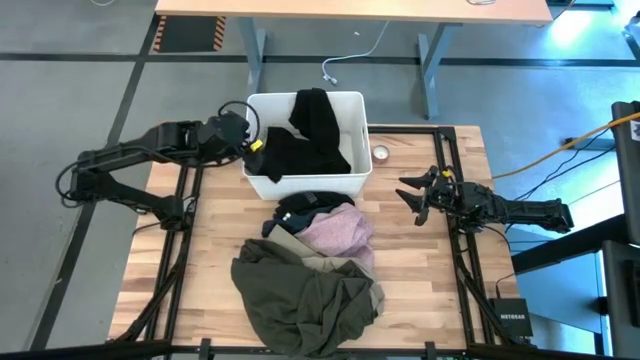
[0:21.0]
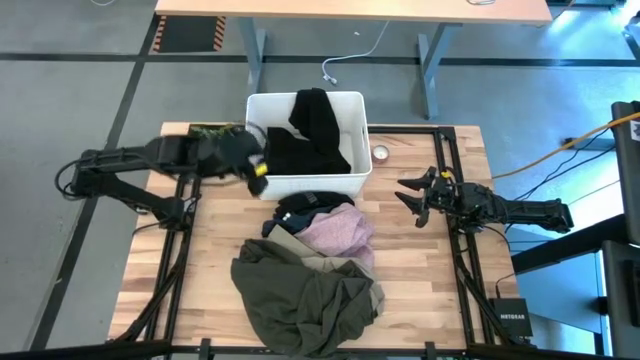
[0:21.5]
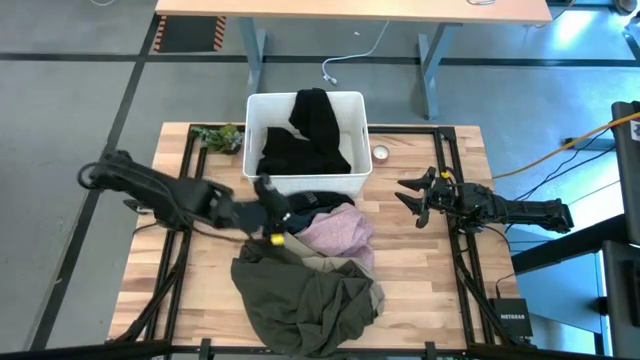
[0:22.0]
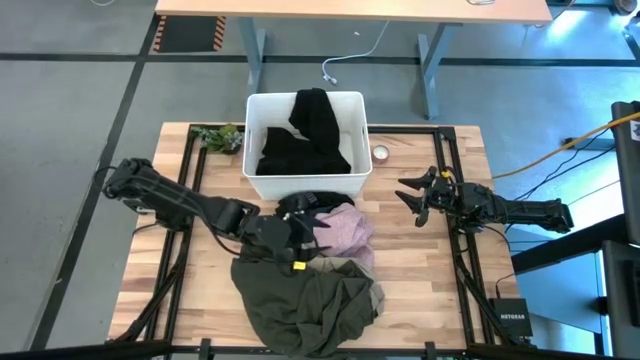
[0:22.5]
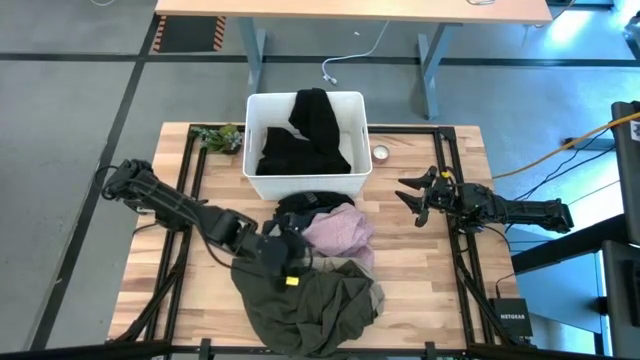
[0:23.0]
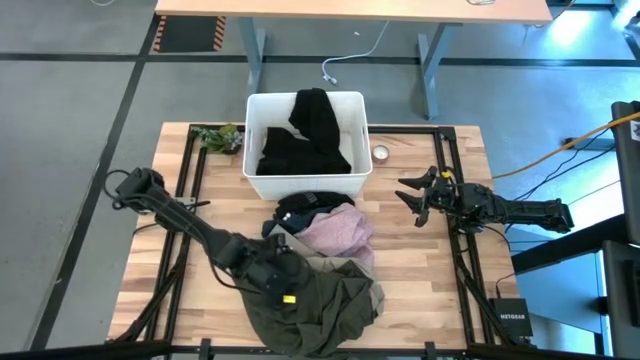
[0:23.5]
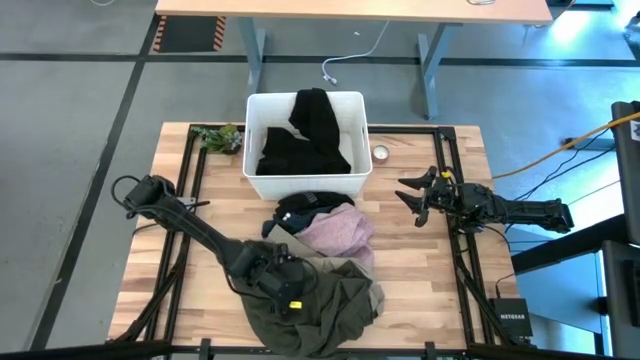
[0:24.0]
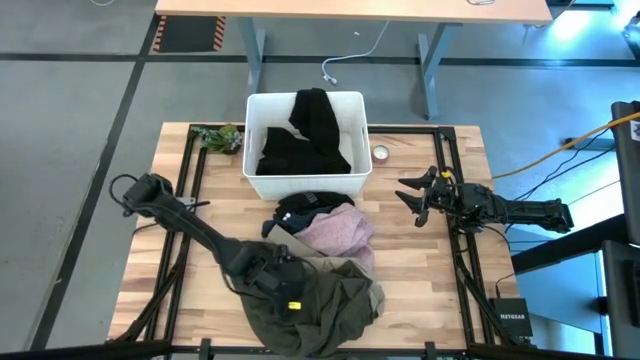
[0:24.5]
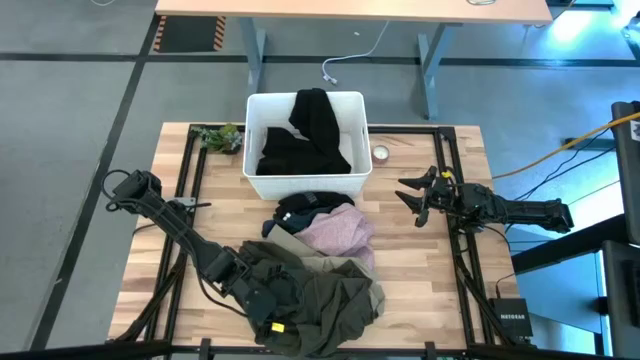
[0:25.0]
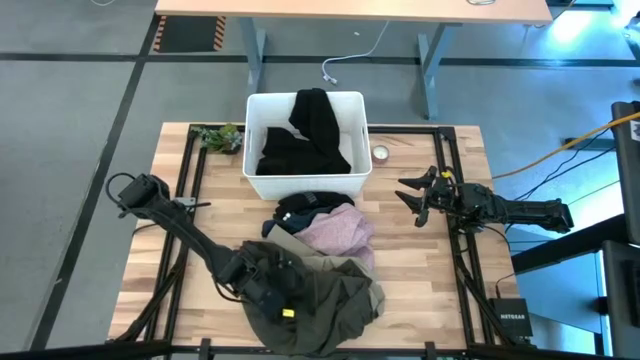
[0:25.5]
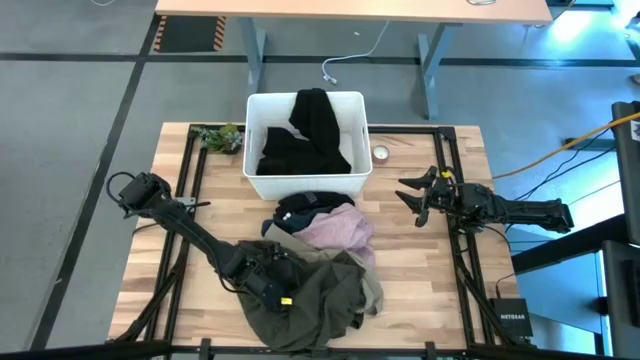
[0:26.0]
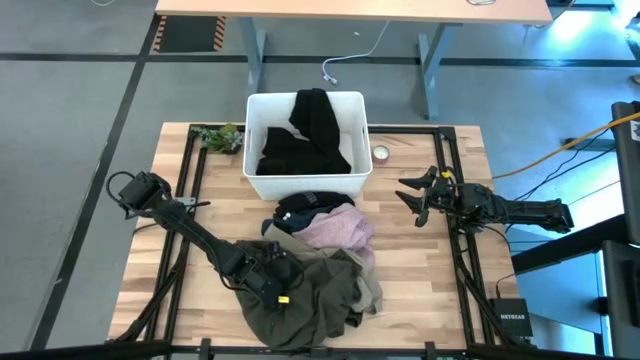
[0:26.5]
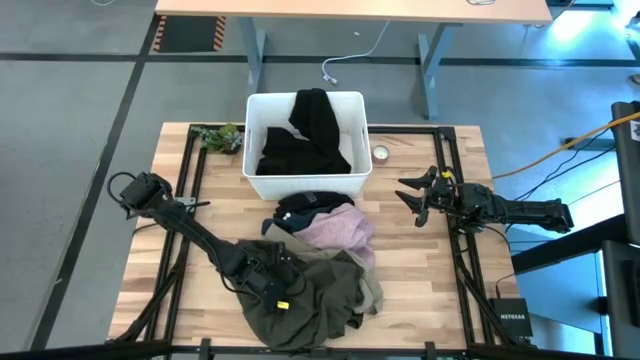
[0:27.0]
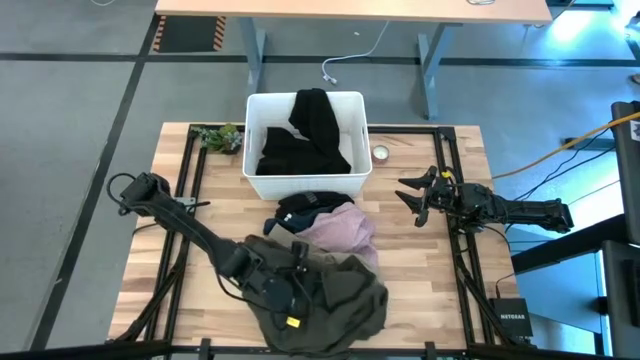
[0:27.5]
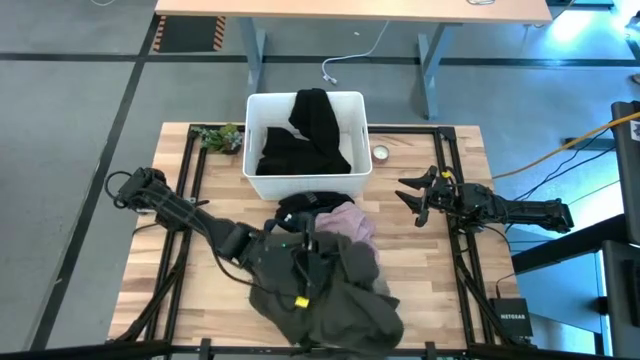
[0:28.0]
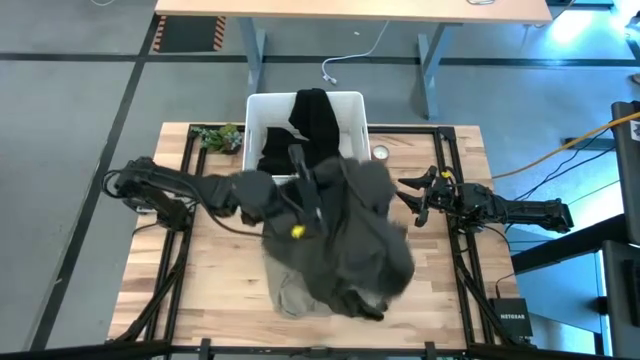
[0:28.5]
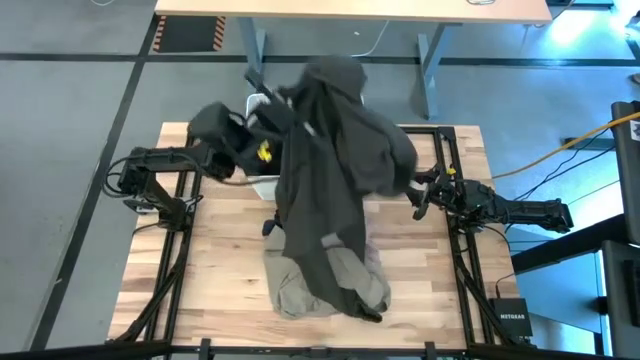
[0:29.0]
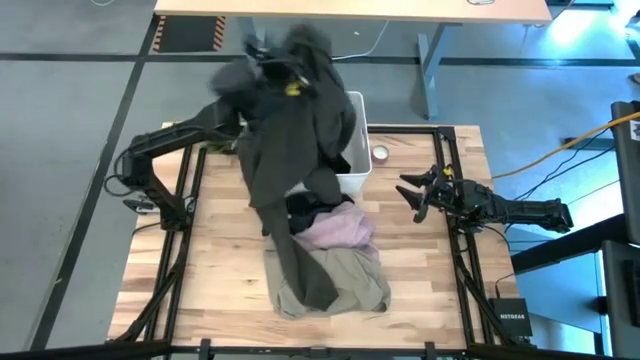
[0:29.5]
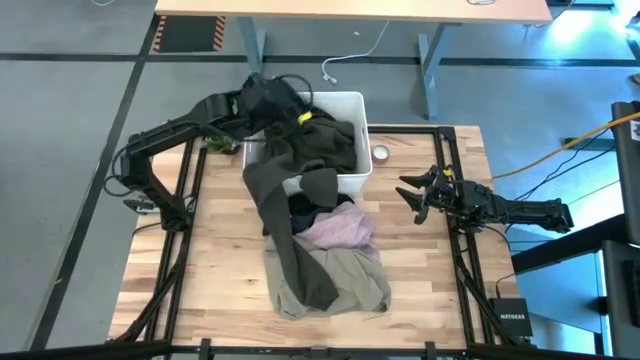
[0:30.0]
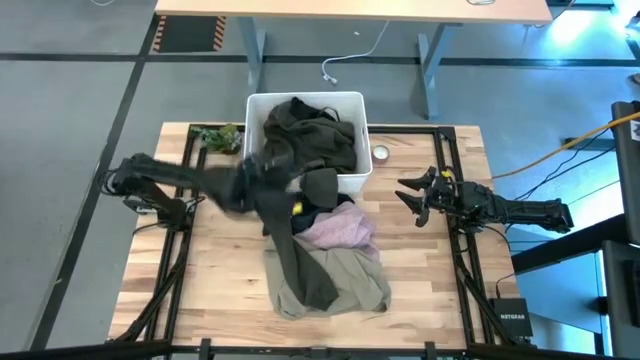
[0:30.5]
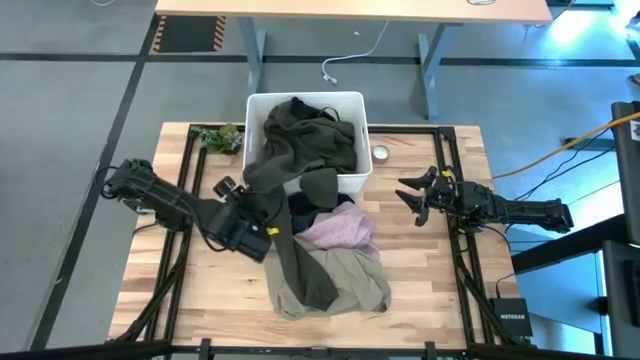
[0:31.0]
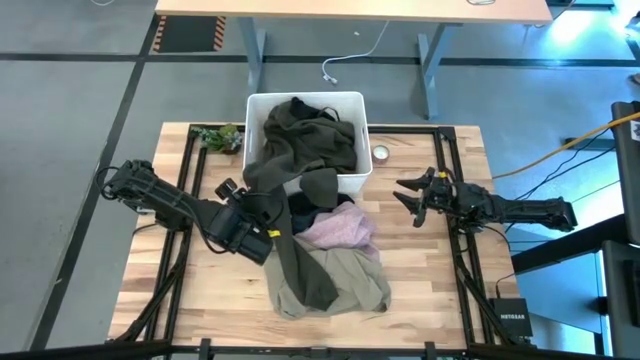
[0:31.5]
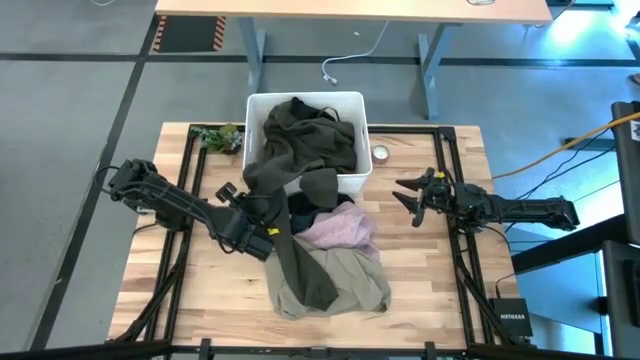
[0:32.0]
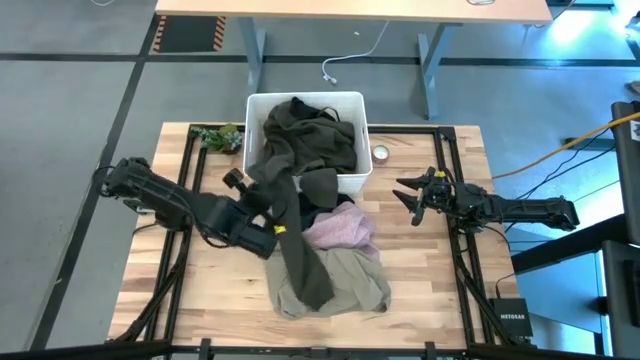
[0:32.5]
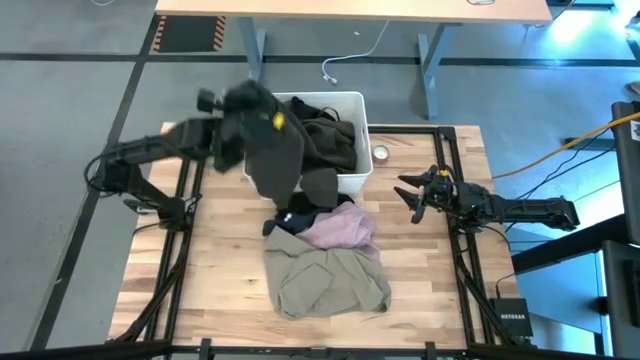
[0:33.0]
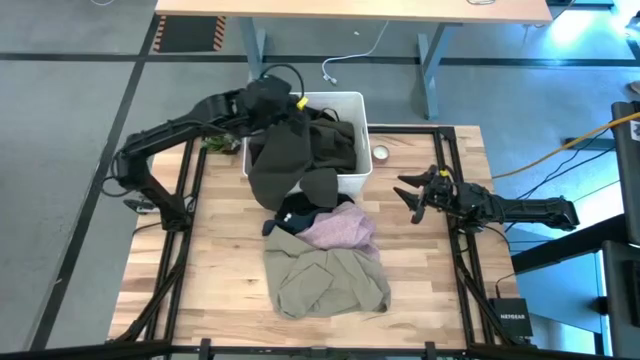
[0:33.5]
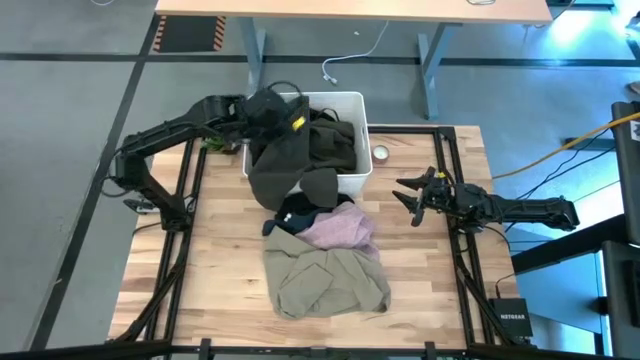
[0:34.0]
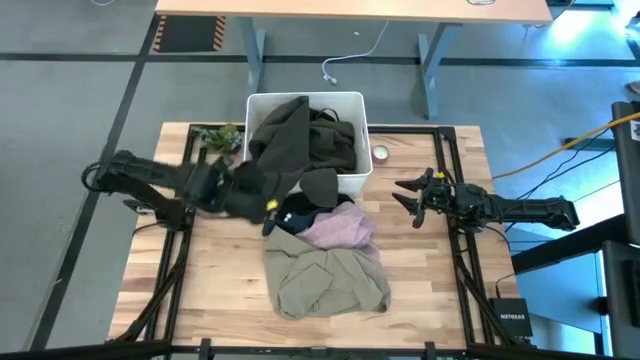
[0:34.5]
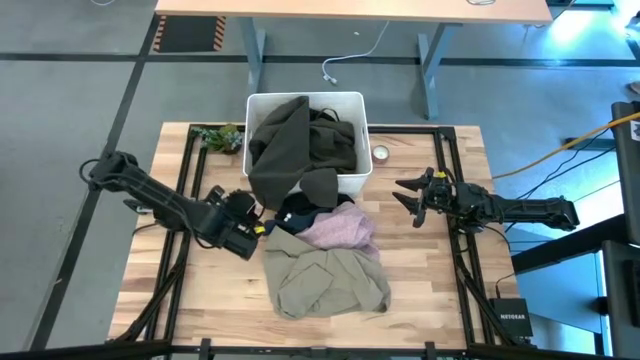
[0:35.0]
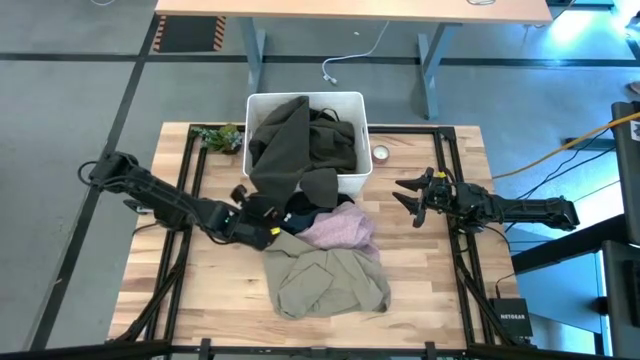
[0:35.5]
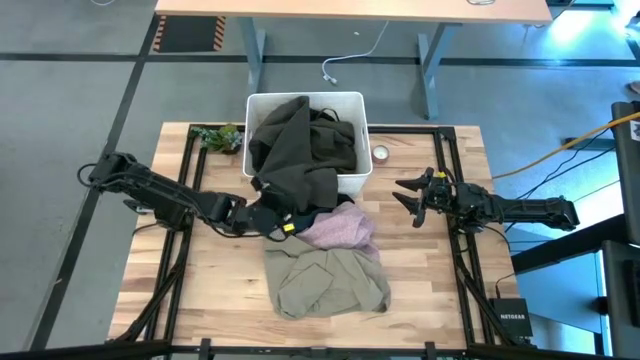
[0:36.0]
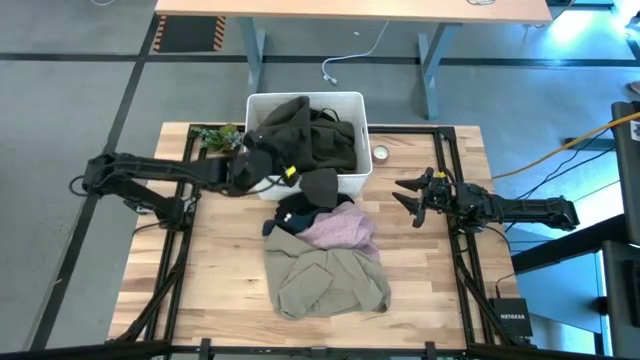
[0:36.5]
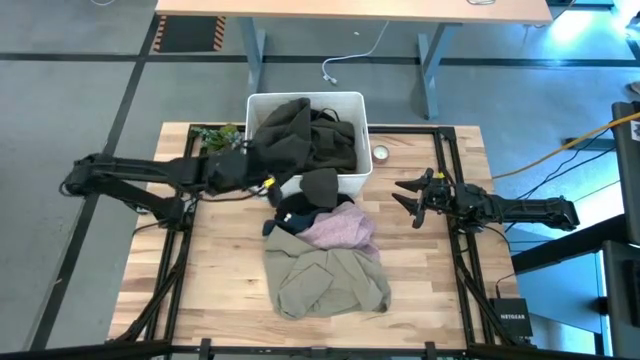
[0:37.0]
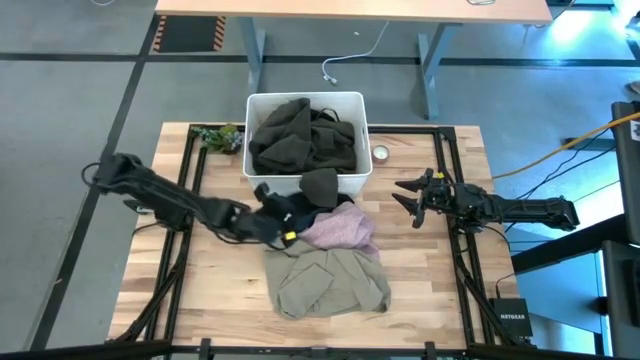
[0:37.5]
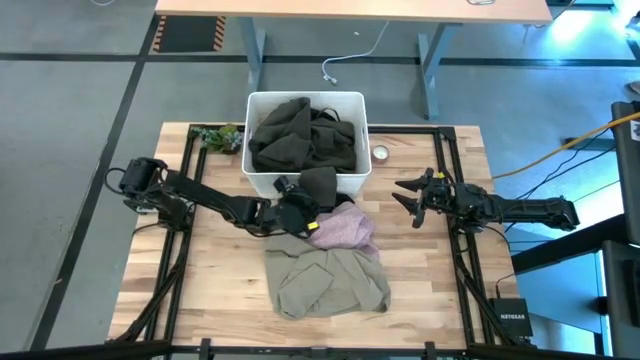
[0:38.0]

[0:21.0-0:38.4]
Task: Sort clothes
Put the gray jacket into the white laundry bin

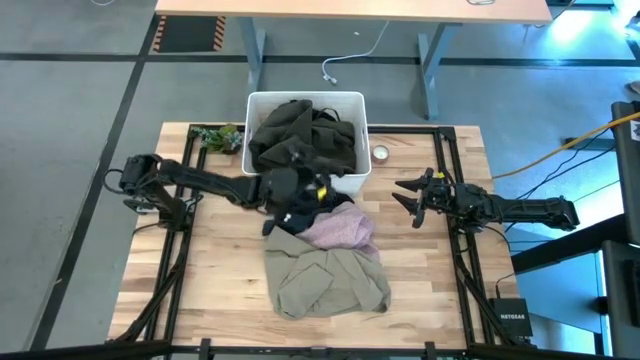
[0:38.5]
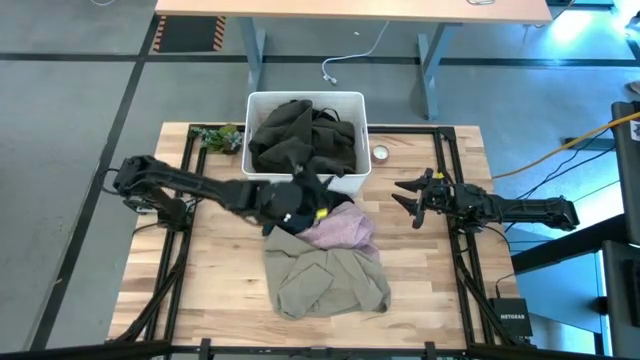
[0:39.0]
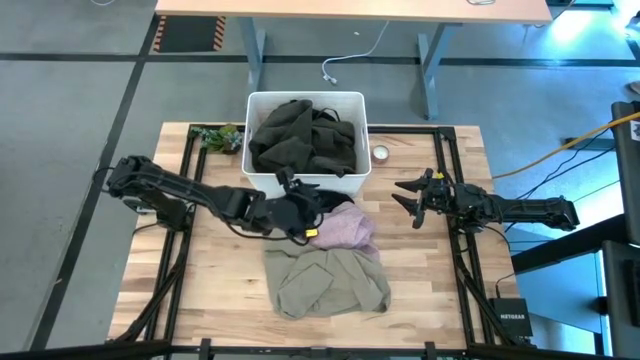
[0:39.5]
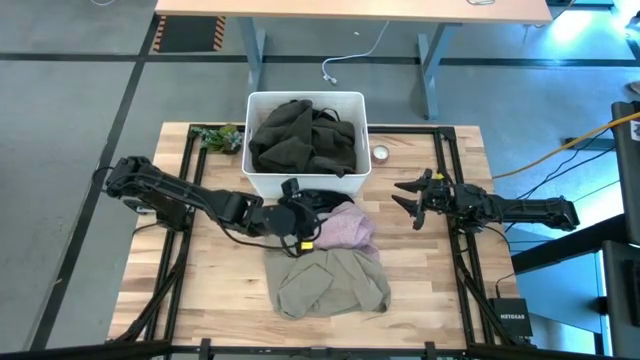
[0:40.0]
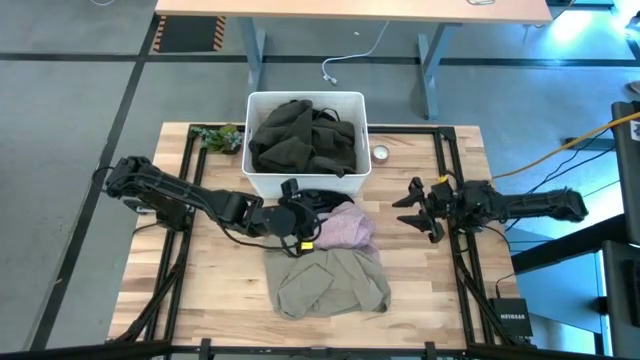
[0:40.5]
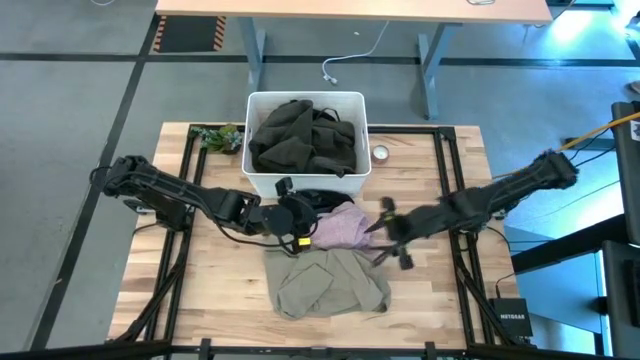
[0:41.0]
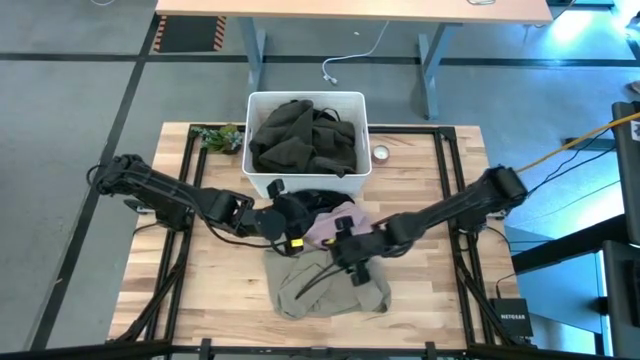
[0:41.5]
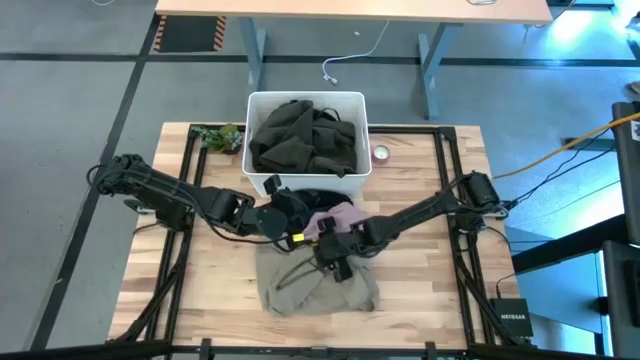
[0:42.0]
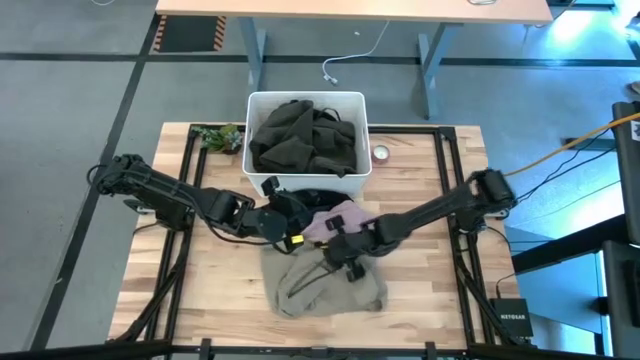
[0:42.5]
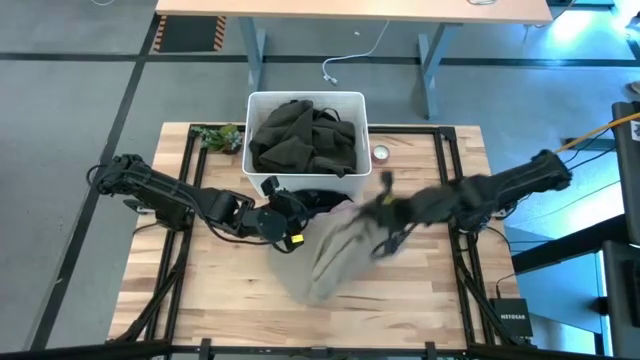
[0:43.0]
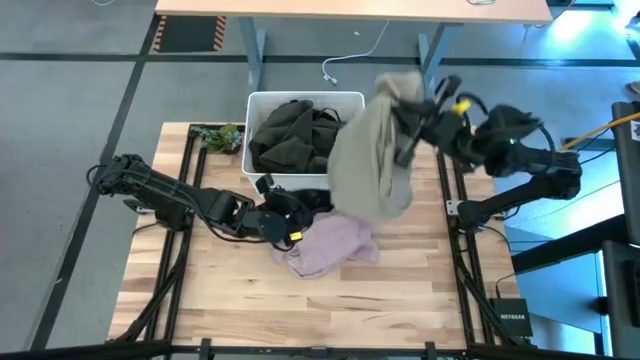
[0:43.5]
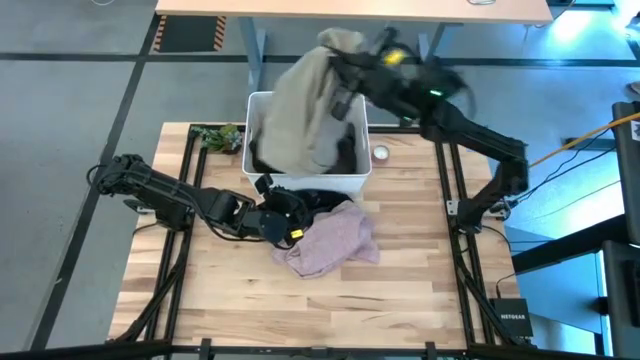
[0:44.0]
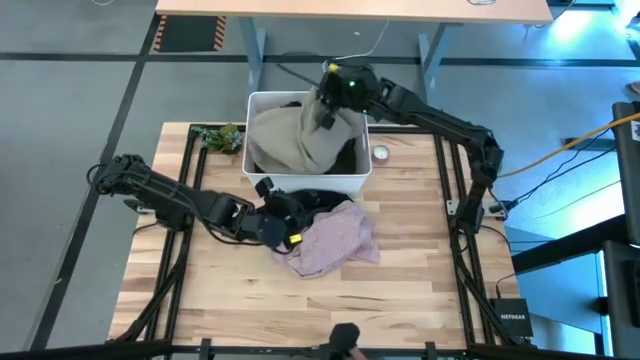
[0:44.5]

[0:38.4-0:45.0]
Put the brown shirt into the white laundry bin
